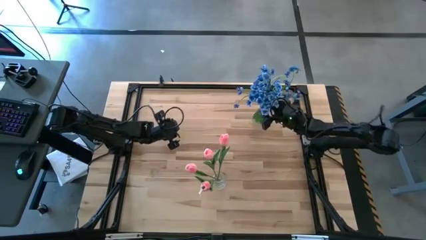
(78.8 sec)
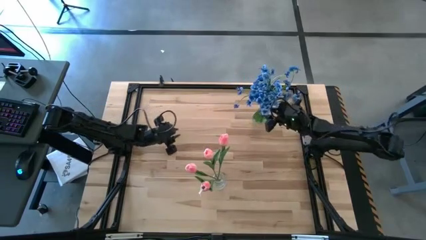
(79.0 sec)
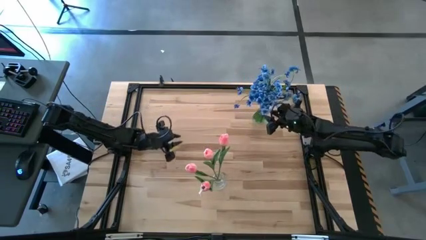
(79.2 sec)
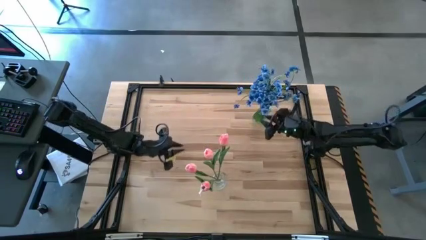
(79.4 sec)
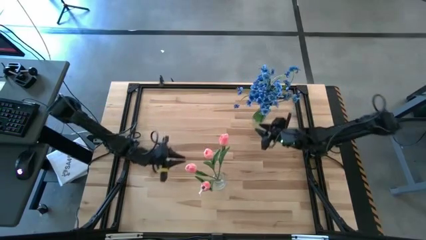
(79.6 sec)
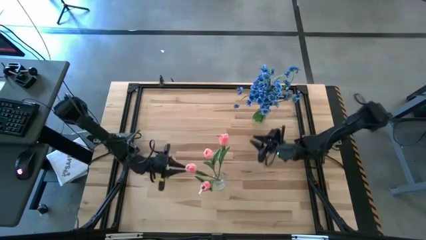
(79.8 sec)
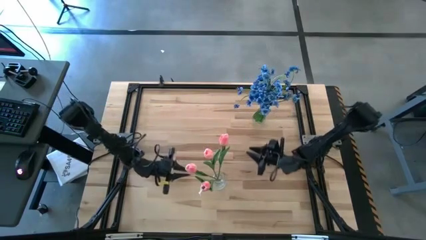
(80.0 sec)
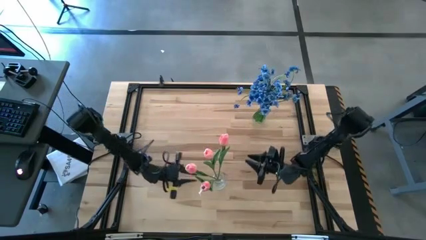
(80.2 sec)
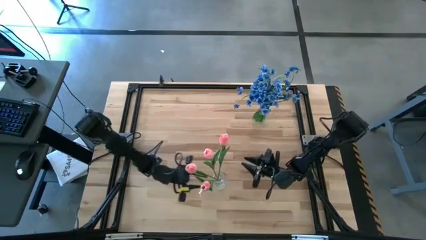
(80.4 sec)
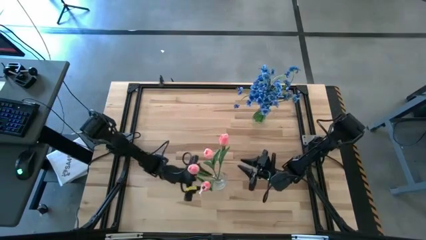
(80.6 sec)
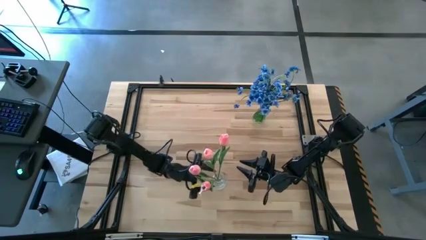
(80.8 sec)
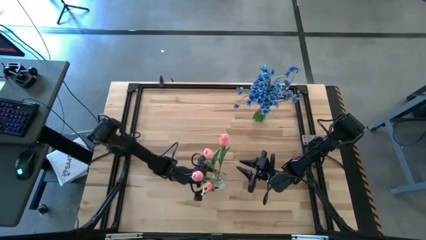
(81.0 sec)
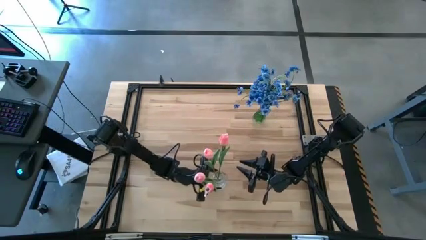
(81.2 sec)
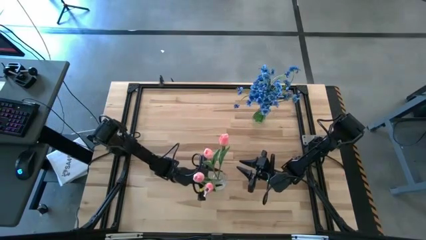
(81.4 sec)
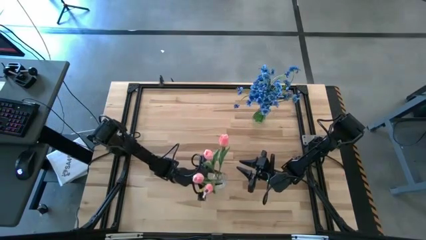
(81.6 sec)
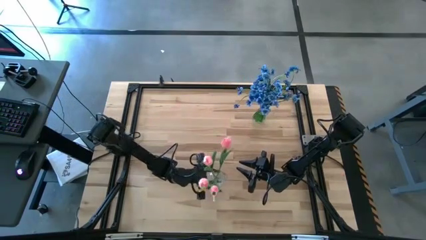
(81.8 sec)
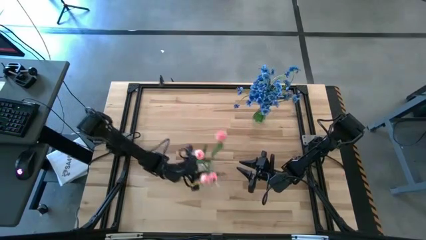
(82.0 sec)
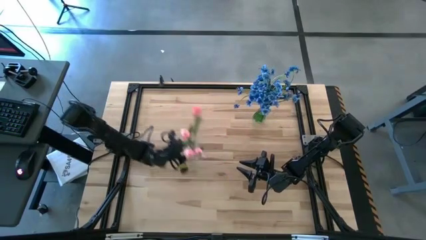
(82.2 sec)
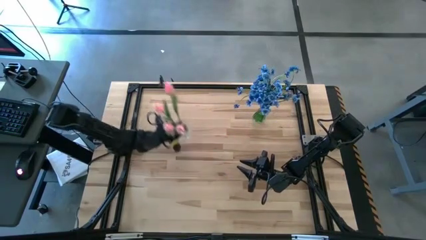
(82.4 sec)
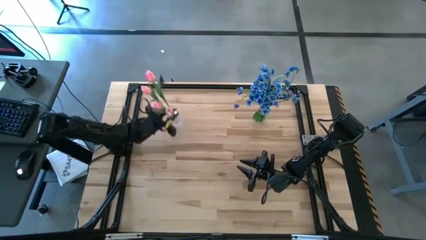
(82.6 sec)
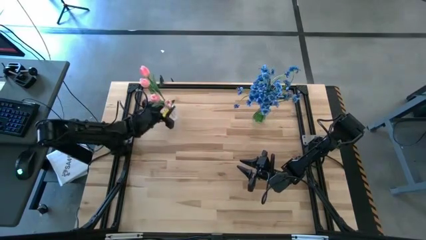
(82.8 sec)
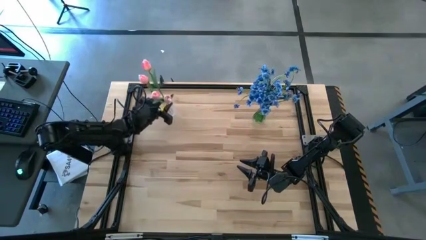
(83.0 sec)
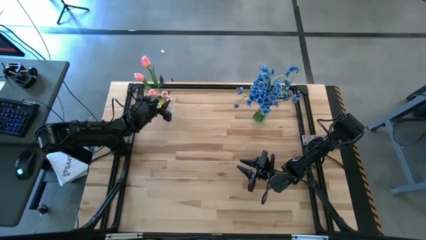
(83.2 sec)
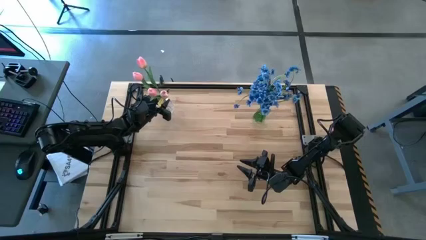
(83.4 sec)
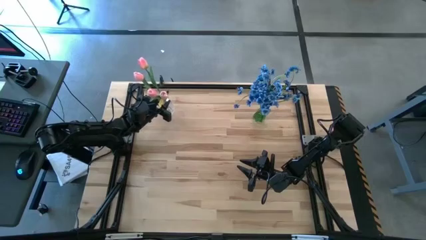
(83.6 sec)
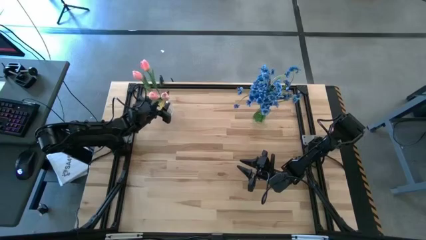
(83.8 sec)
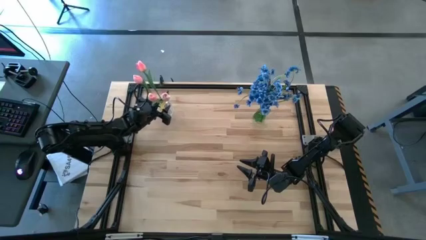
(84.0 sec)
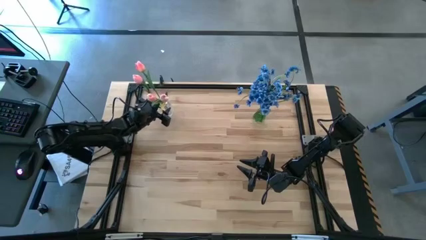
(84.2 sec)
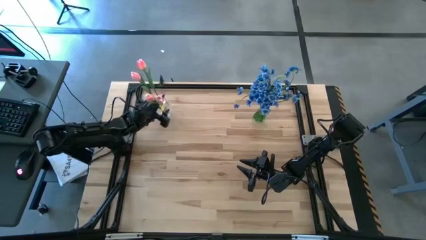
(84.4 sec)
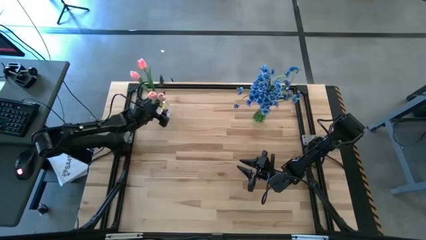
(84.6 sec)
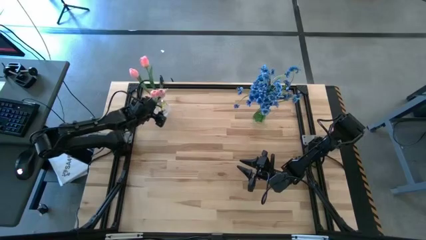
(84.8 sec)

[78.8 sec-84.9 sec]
Task: Sort flowers into vase by color
Move the transparent vase to the top left of the table

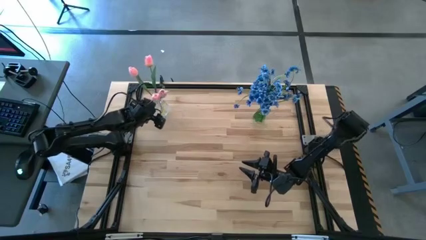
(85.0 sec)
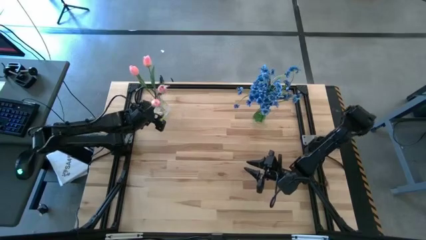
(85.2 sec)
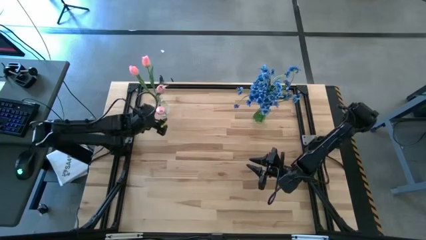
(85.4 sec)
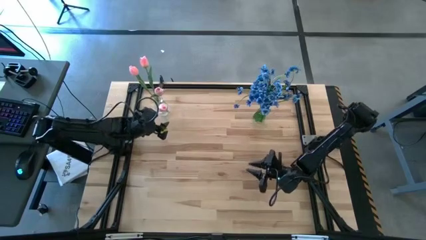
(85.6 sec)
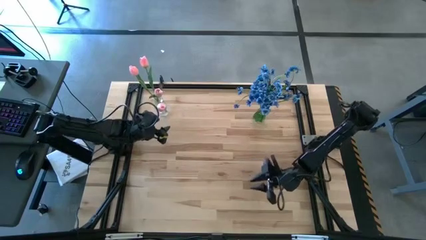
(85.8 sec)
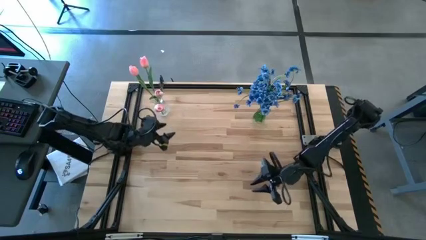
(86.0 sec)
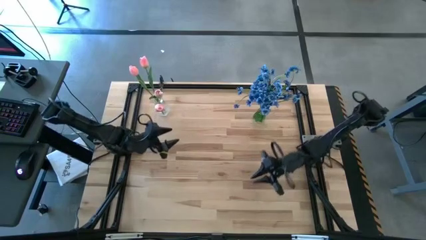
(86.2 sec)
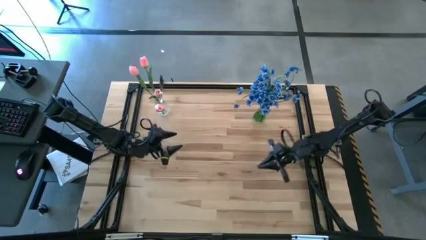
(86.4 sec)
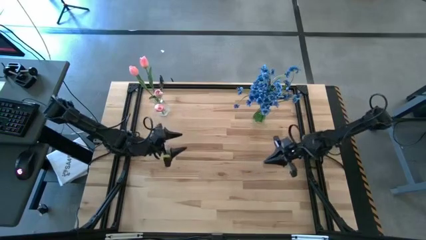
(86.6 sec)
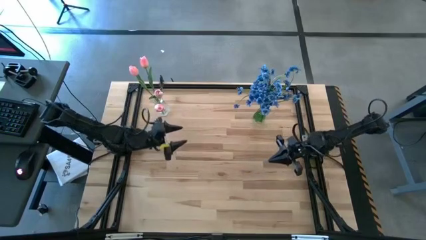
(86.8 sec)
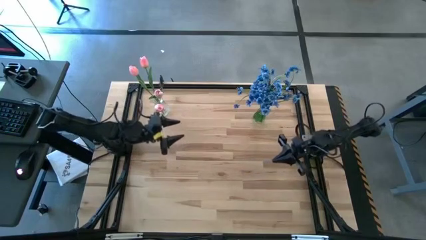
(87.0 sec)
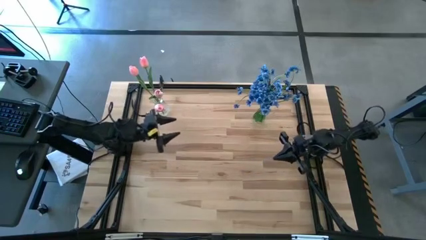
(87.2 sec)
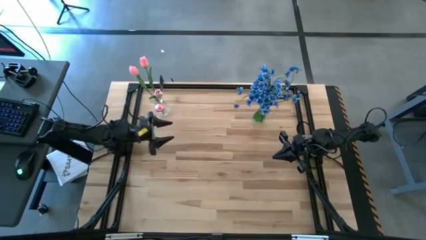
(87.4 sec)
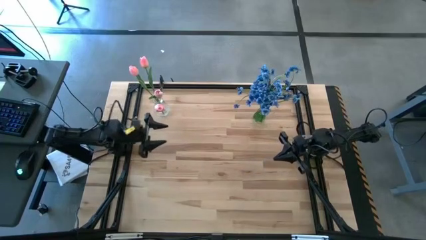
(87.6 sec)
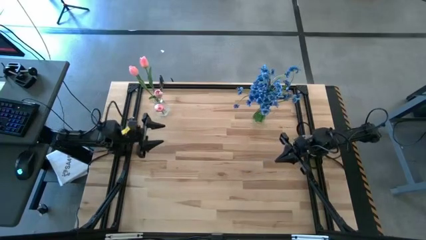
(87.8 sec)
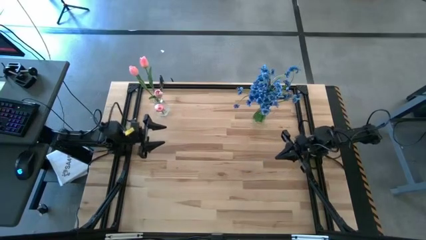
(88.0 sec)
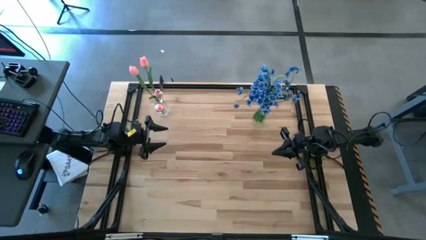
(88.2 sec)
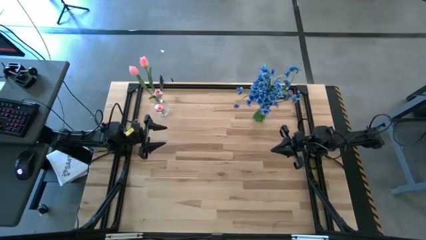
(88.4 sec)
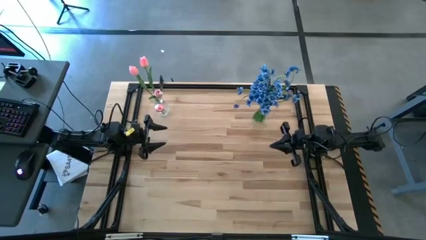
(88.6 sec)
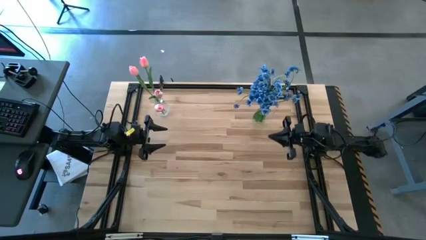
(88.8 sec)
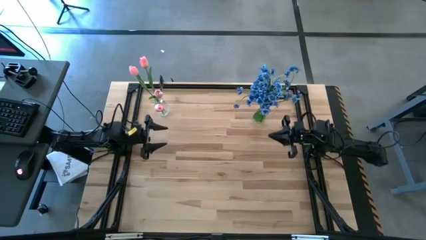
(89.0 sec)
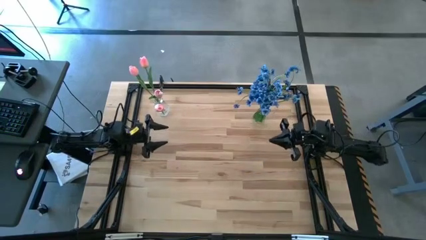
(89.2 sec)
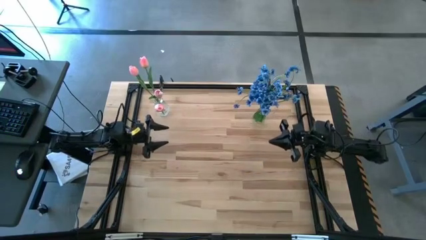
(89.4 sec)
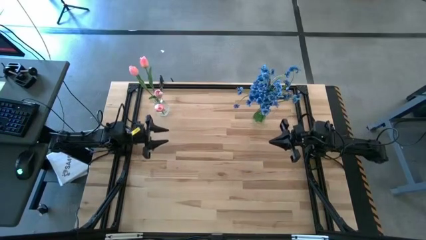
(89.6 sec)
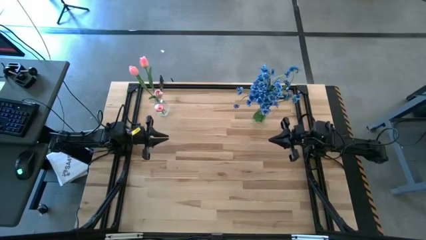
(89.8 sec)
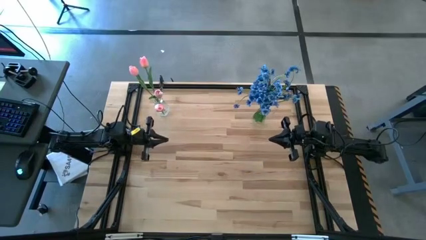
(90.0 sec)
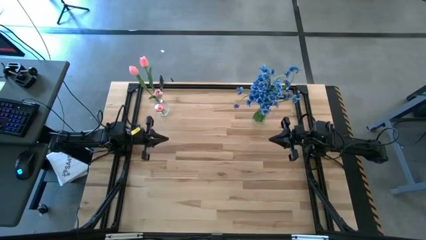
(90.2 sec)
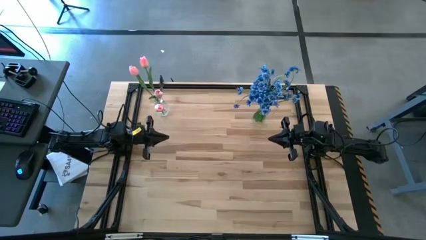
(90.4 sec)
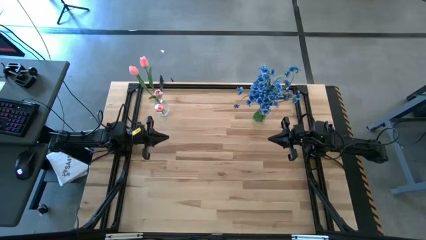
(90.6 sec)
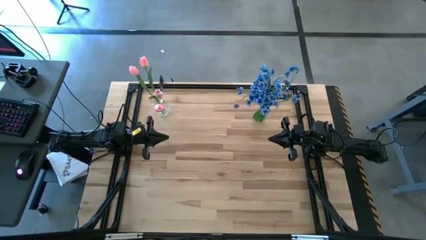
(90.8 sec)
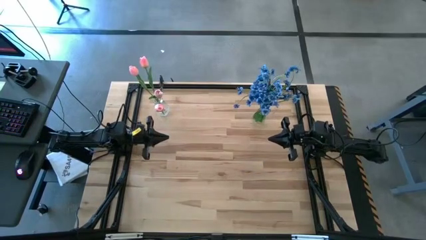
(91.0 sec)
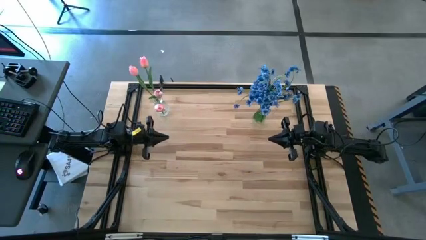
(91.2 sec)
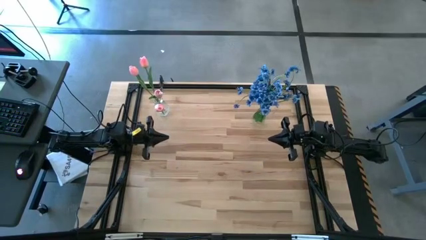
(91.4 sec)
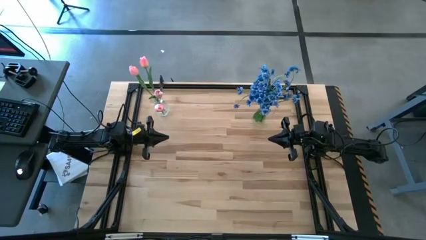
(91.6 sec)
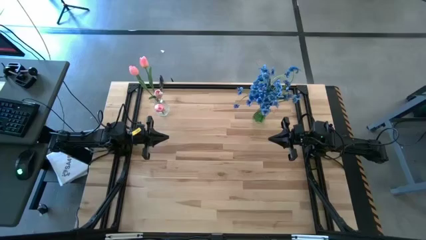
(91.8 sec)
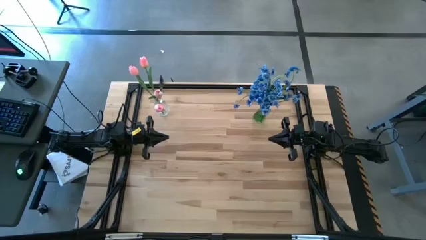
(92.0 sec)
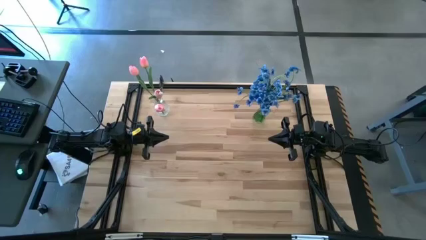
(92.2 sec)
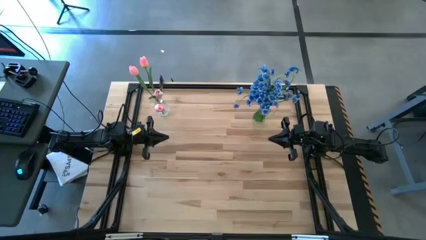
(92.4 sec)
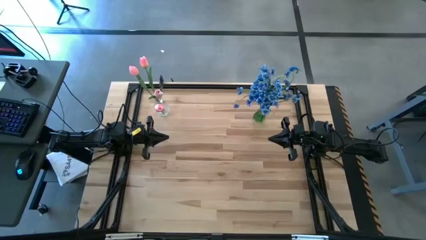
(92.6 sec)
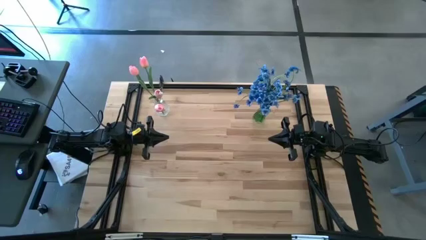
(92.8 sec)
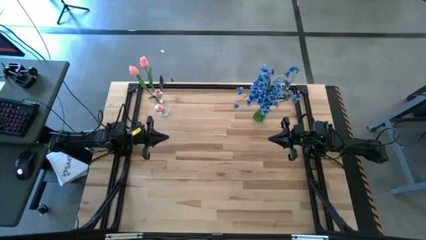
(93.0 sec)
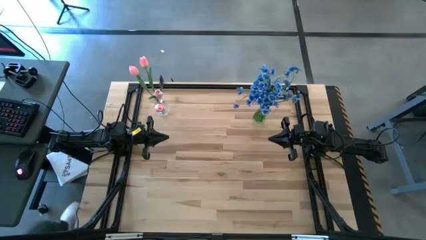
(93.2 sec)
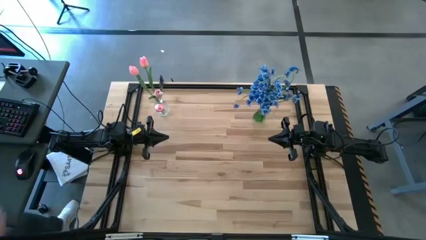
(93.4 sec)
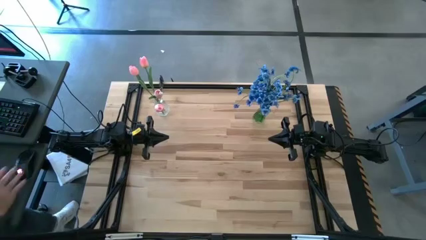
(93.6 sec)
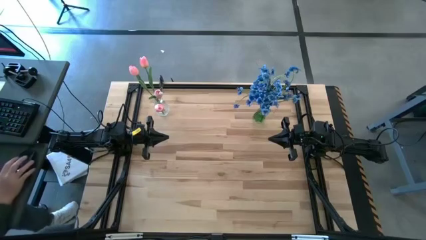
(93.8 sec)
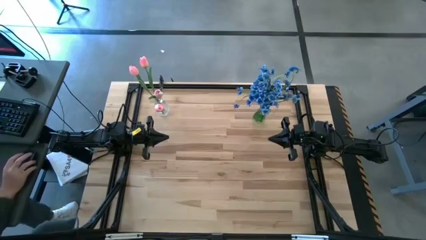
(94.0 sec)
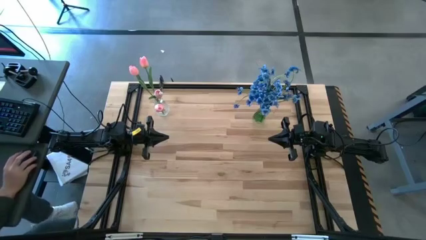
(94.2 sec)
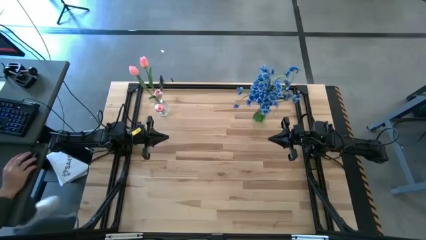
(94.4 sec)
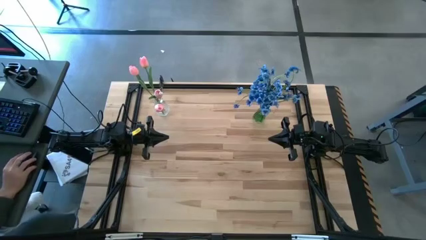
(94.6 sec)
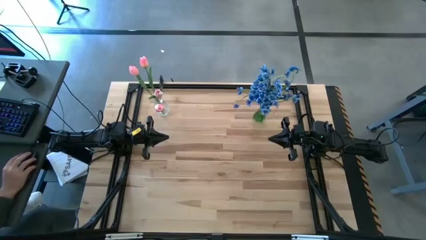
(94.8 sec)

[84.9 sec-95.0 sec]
Return to Home Position
